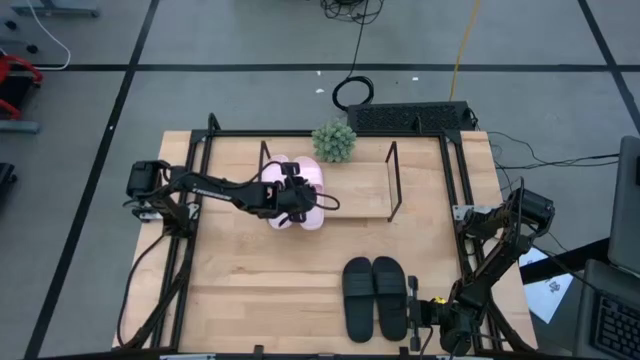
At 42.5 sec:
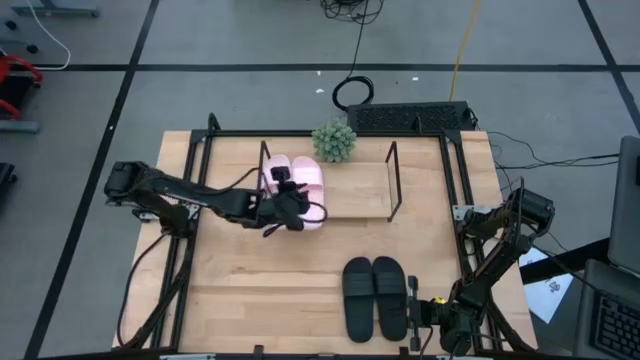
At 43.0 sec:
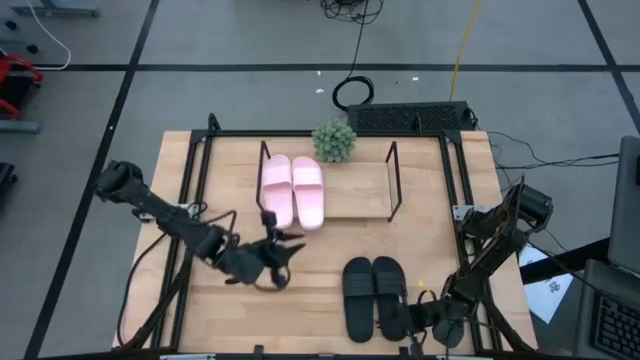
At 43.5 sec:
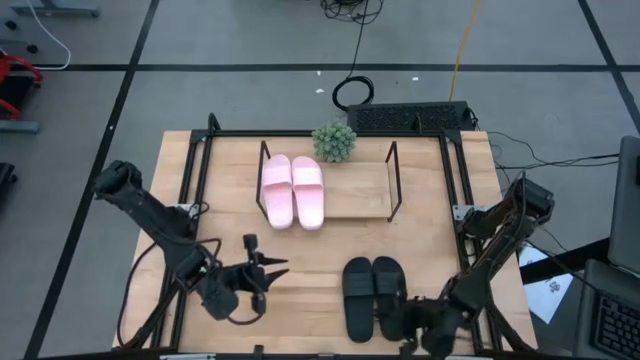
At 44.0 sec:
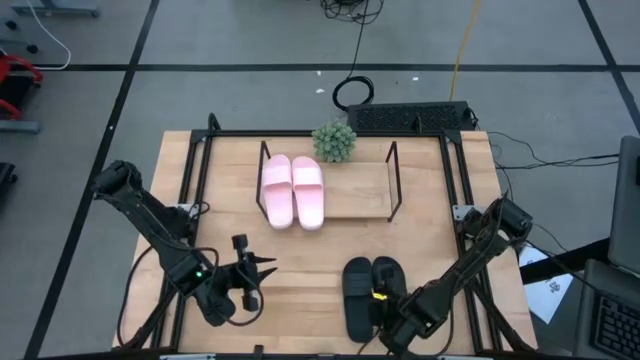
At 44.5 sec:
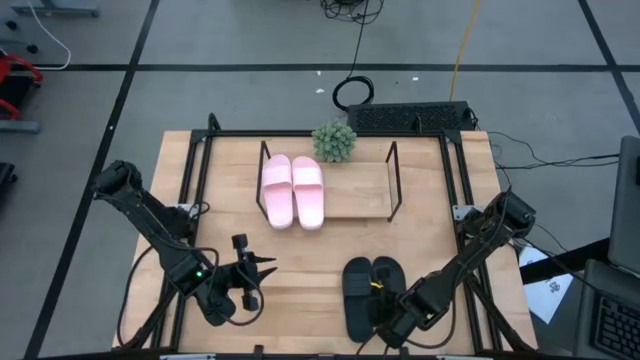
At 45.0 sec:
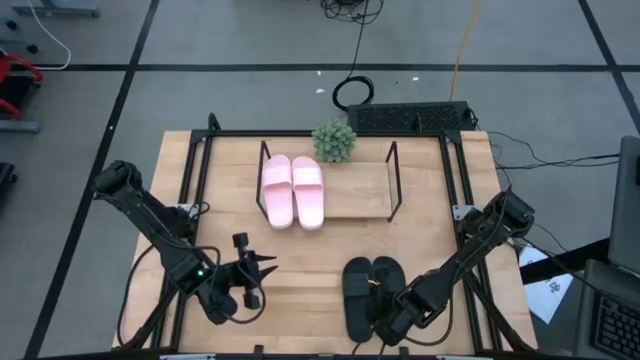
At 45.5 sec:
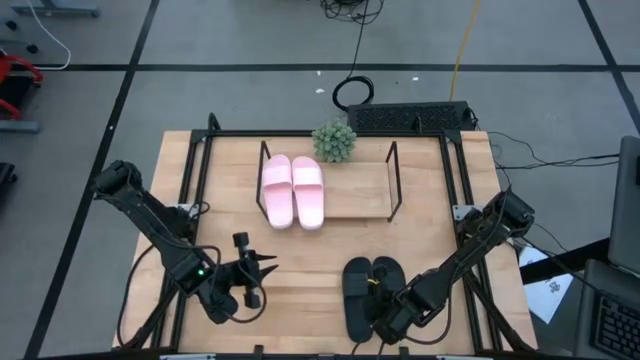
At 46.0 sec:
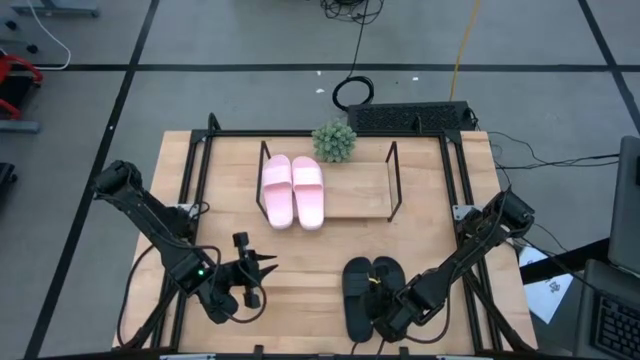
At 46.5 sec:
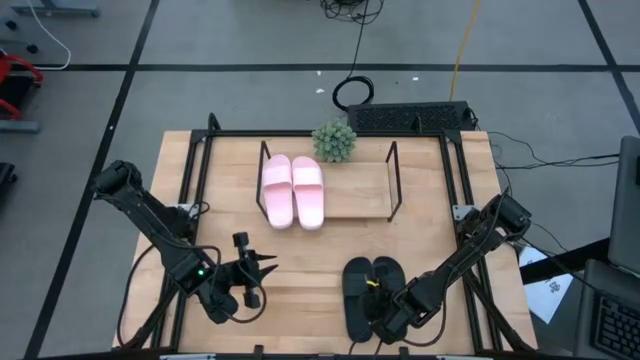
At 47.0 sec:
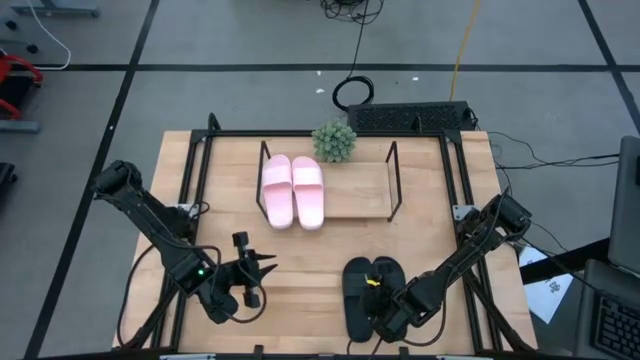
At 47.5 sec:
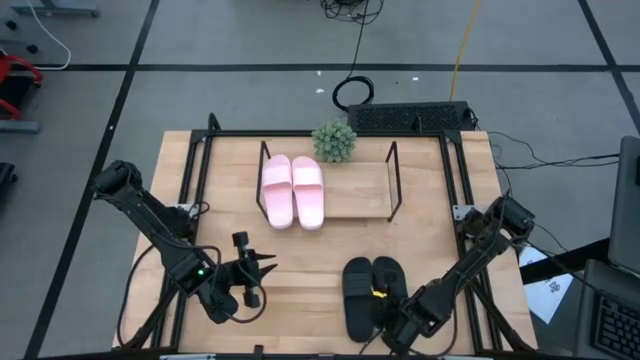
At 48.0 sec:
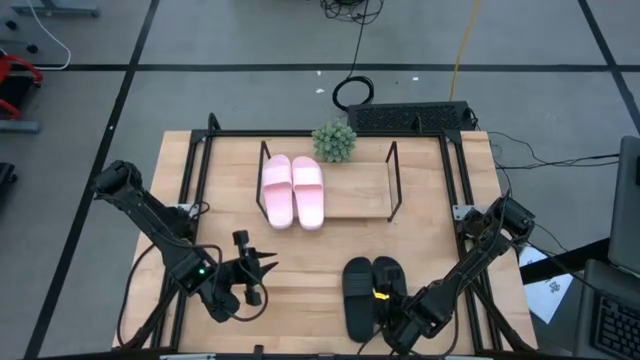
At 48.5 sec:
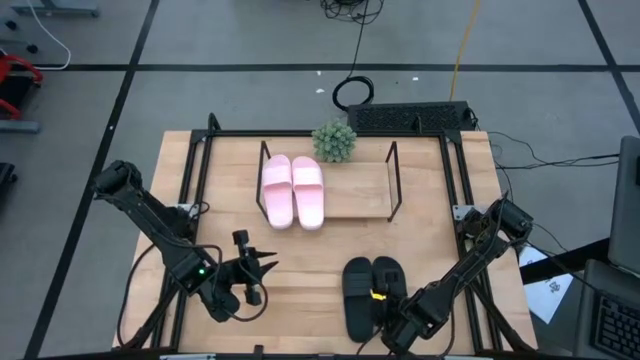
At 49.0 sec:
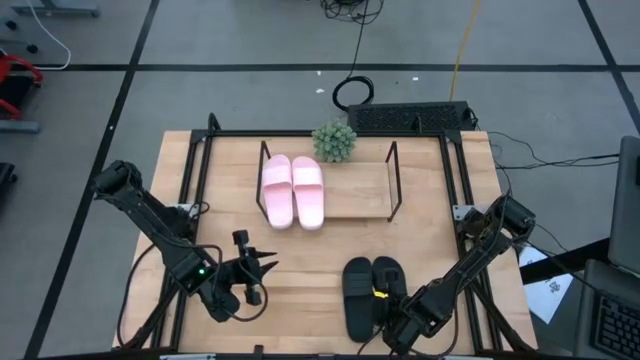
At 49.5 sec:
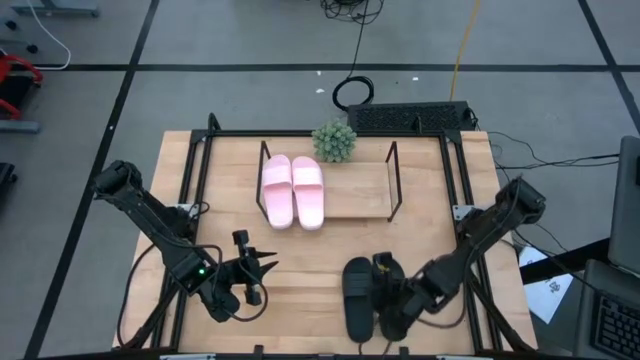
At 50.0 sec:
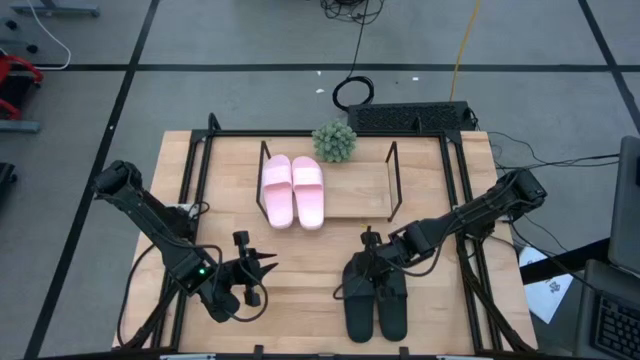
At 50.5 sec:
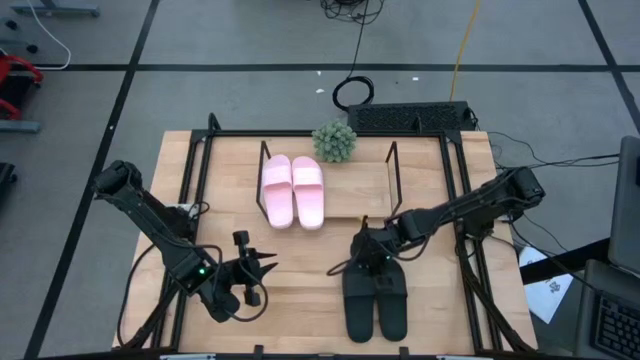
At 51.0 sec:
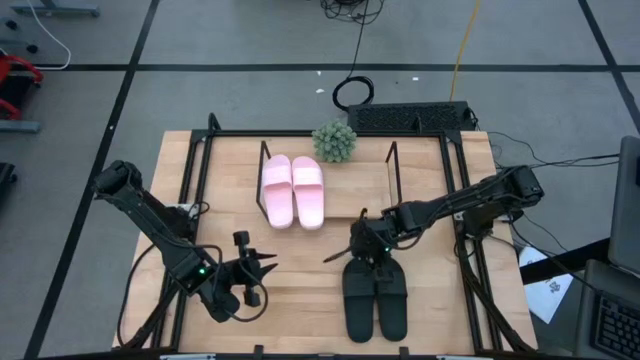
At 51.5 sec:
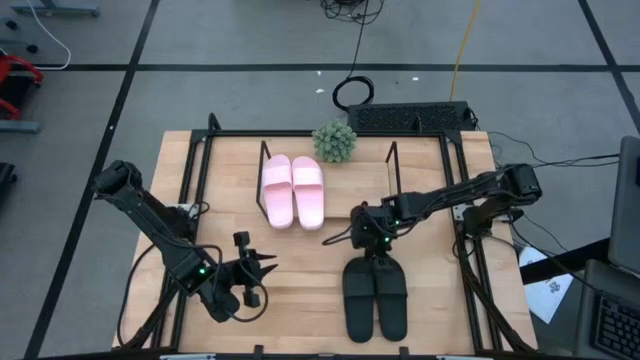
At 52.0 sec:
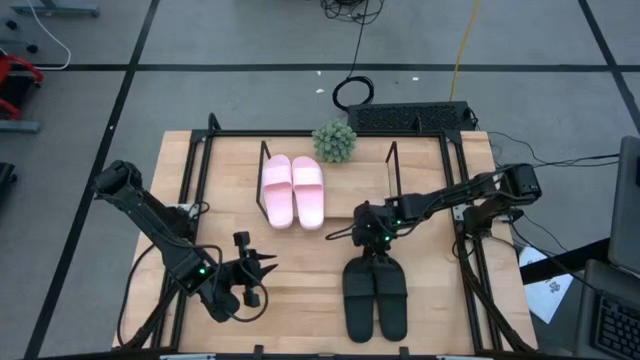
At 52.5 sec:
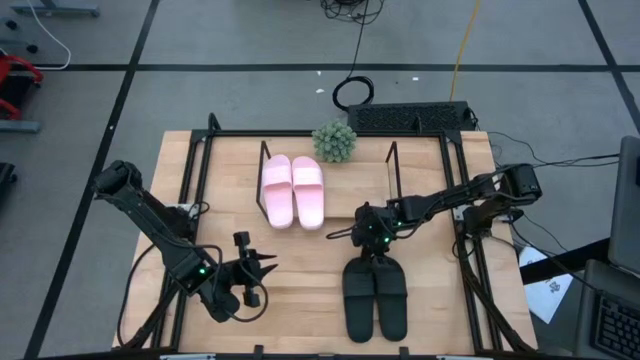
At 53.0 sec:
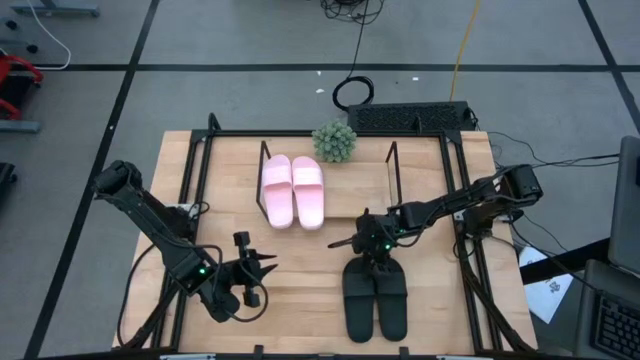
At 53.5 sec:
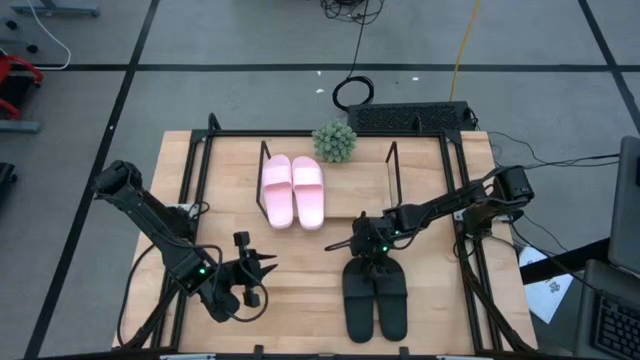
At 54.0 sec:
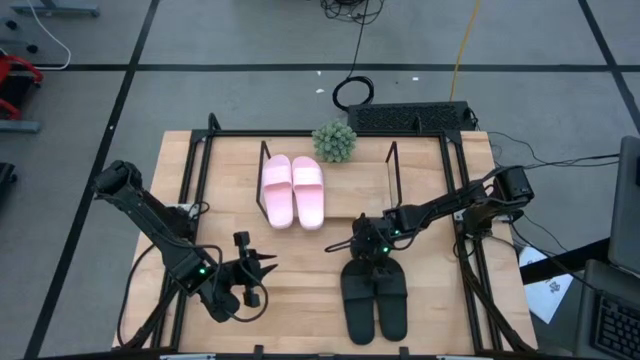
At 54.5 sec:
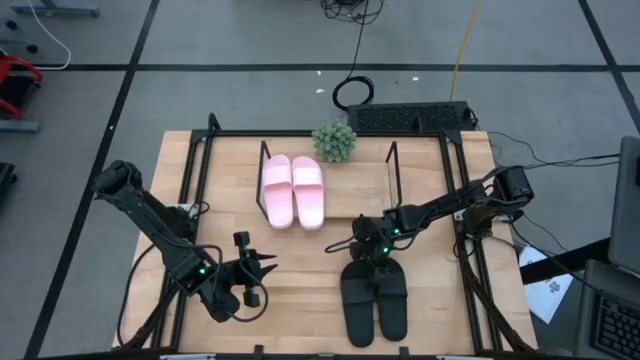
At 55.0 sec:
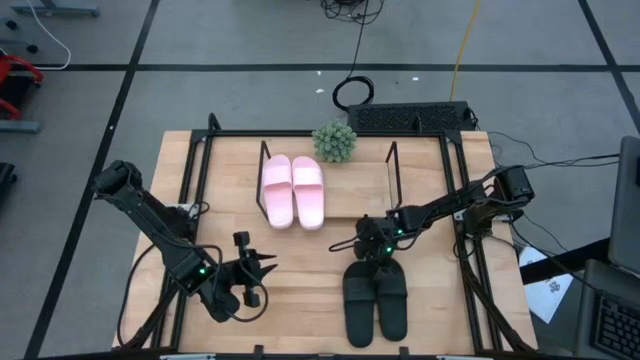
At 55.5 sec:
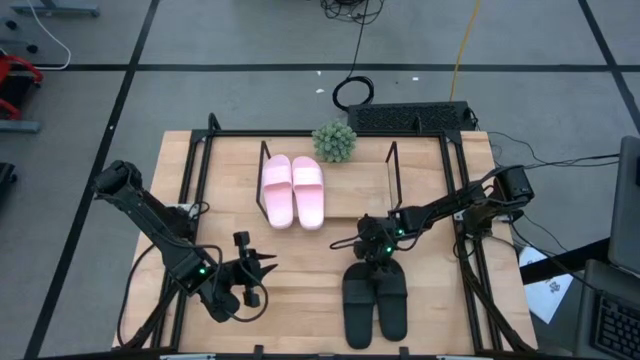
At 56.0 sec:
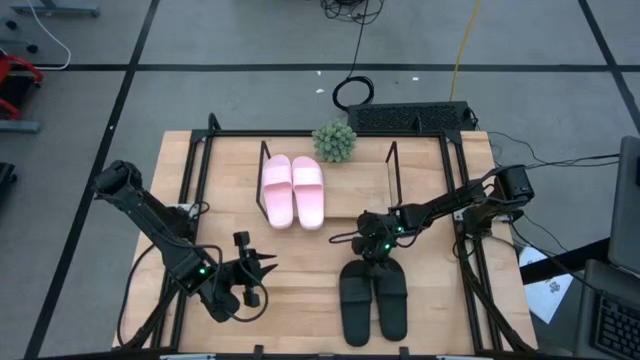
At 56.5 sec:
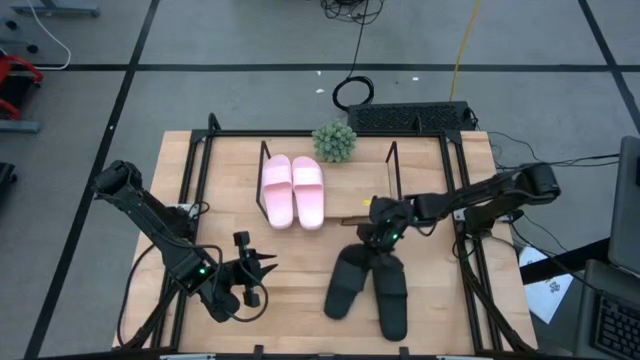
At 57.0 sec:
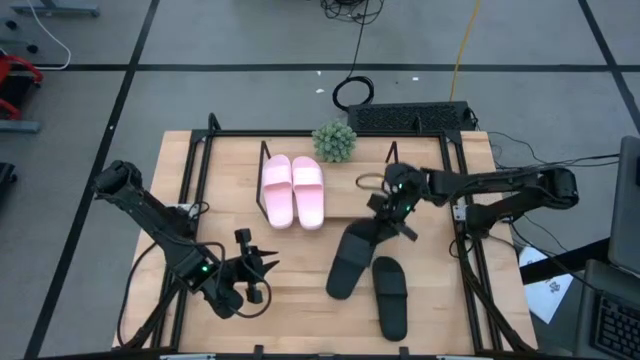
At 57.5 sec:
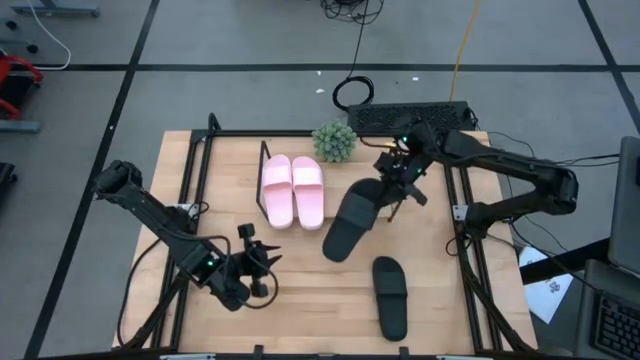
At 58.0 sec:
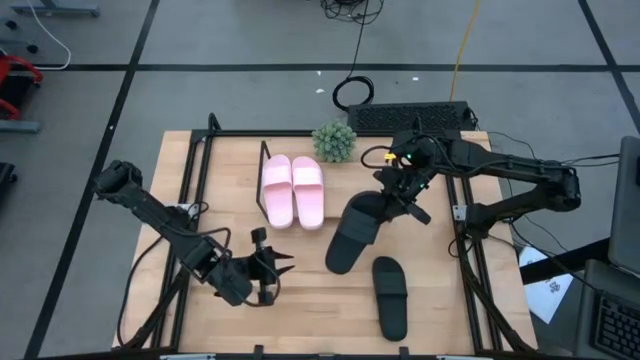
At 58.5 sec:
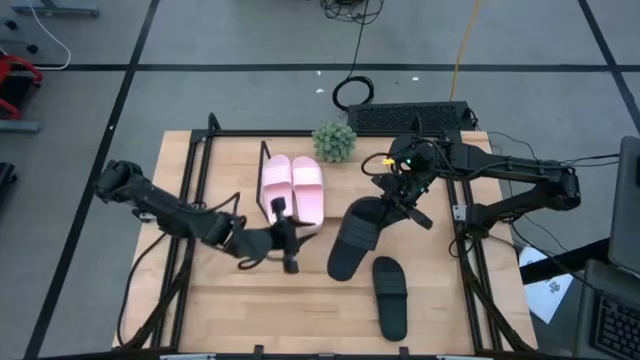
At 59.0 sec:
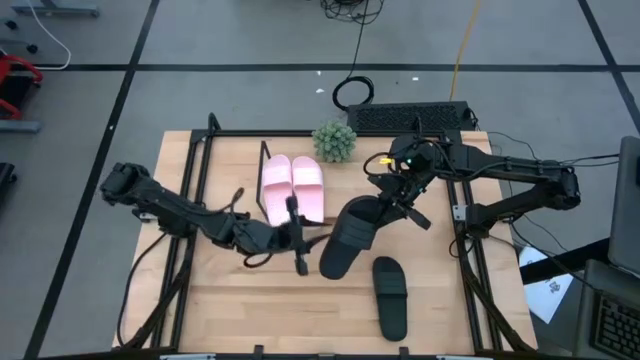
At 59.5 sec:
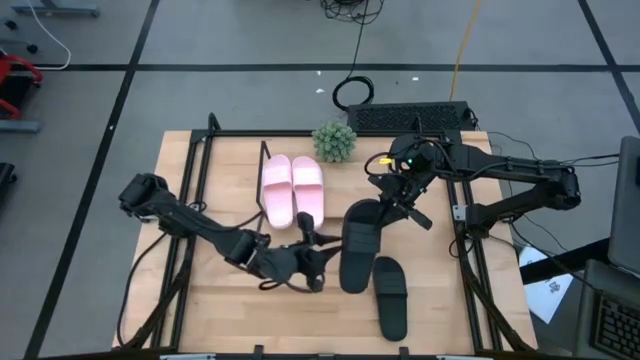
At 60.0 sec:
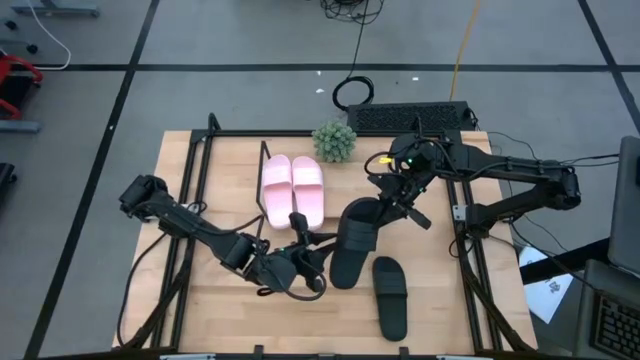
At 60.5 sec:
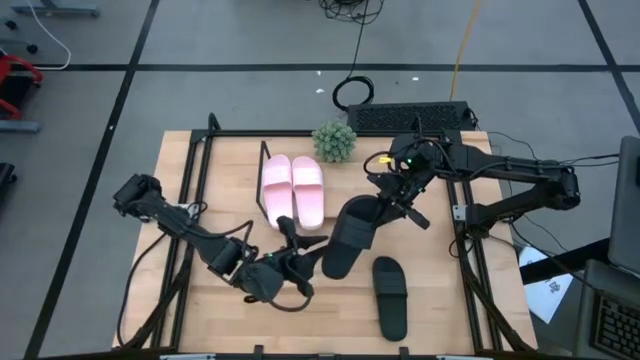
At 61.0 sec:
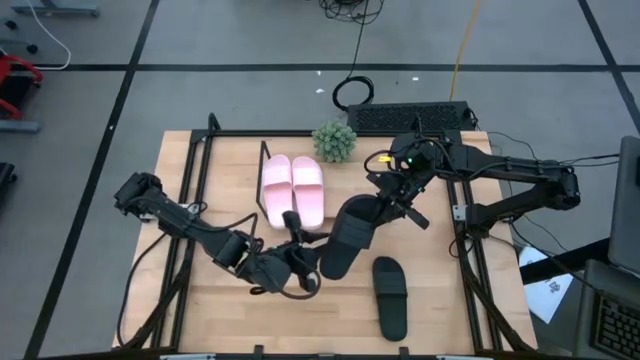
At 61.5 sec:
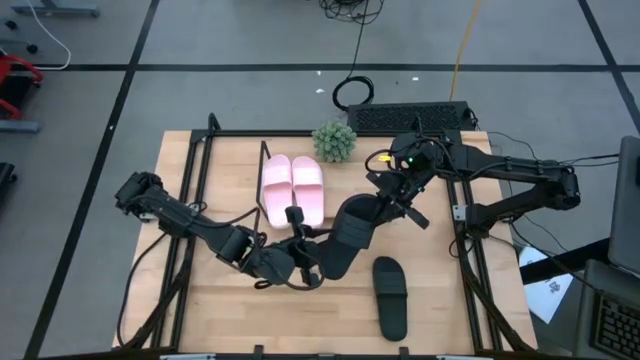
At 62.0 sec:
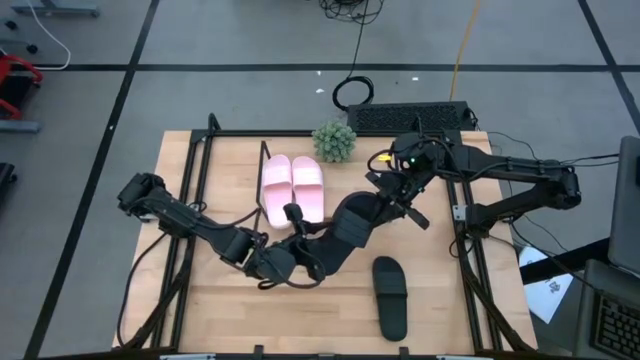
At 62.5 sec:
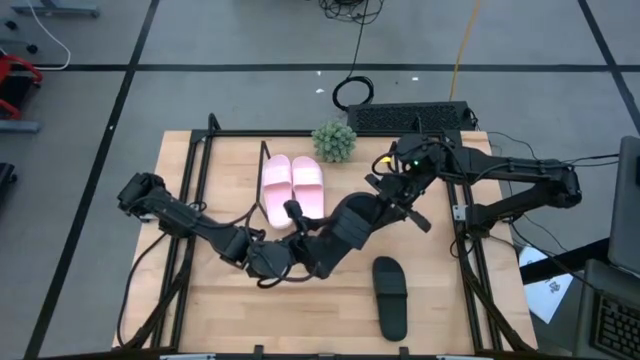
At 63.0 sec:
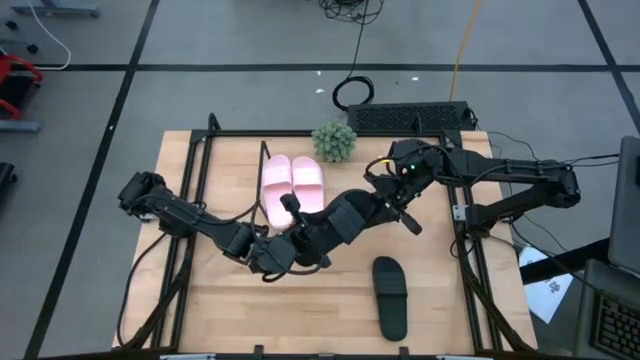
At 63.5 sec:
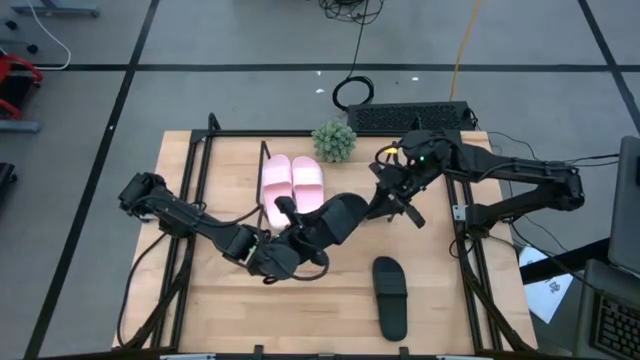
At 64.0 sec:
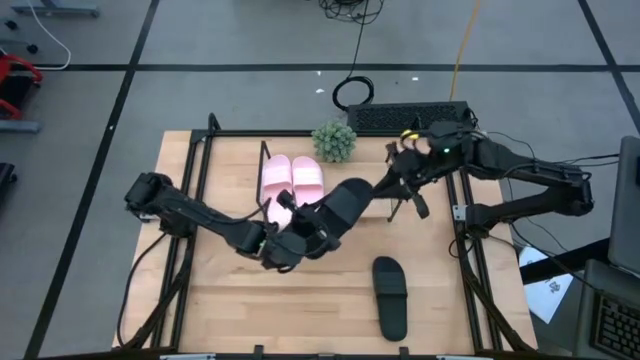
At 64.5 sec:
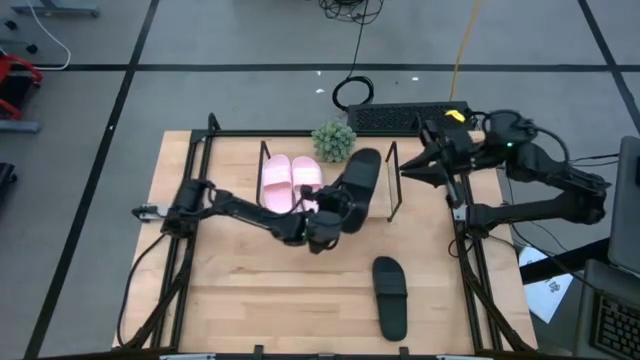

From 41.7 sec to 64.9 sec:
Task: Pick and place slides into the shelf
Put the left black slipper on the shelf
